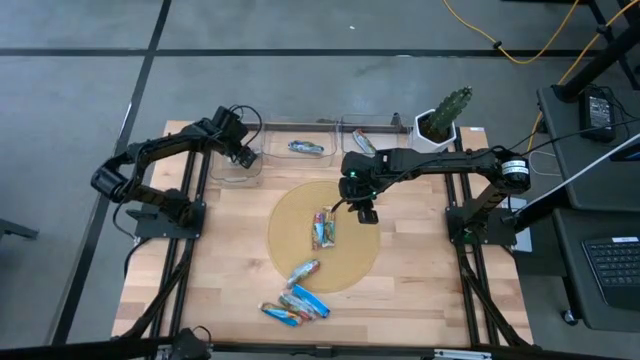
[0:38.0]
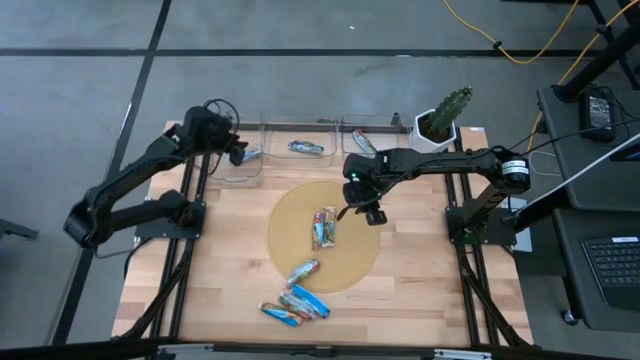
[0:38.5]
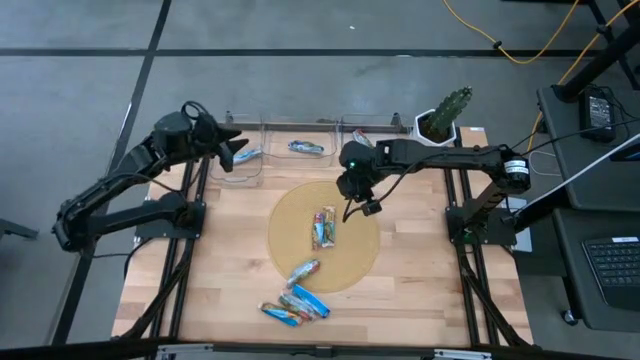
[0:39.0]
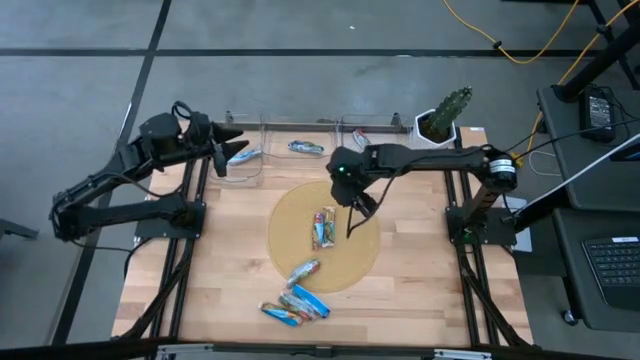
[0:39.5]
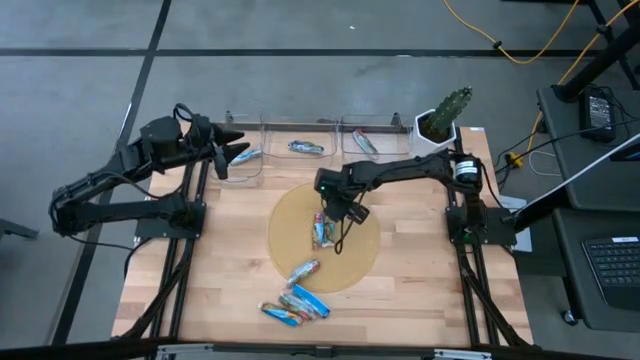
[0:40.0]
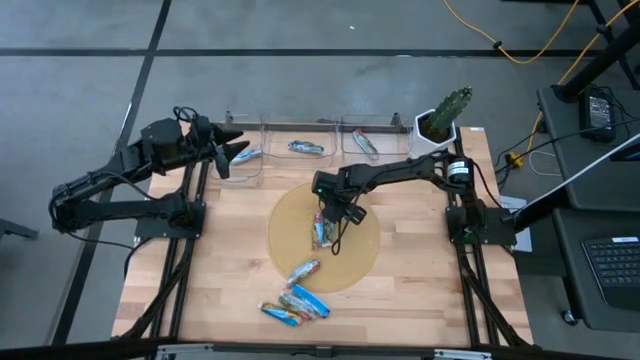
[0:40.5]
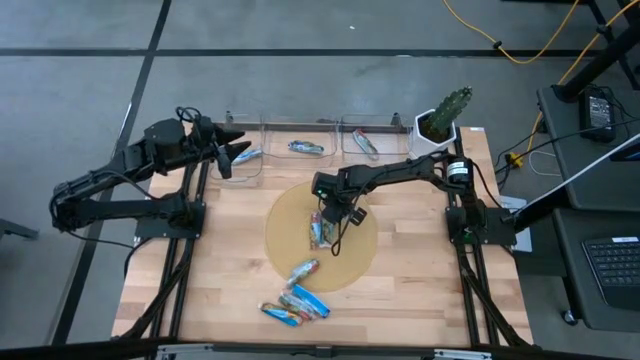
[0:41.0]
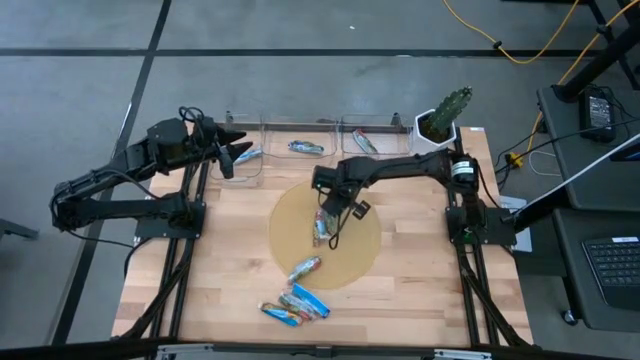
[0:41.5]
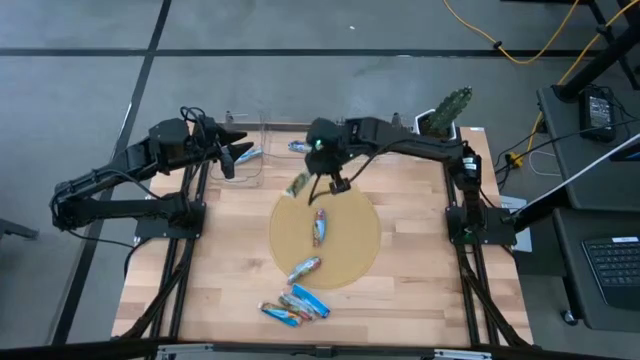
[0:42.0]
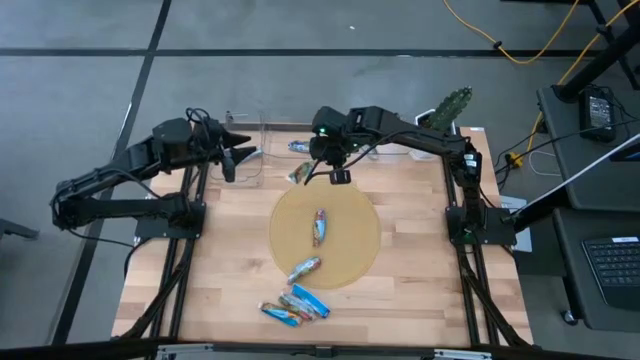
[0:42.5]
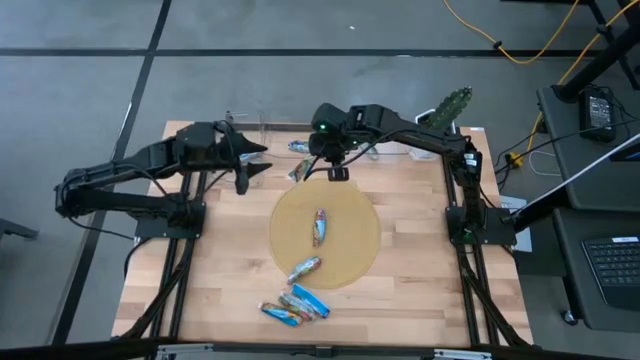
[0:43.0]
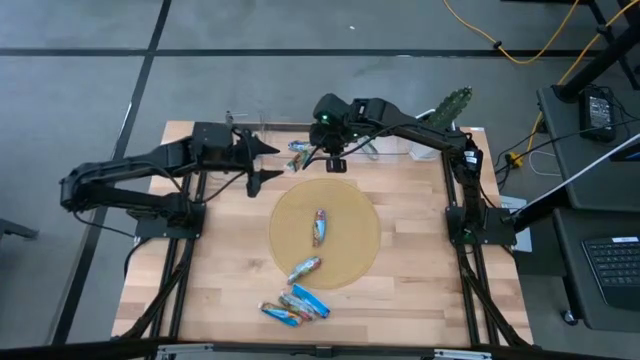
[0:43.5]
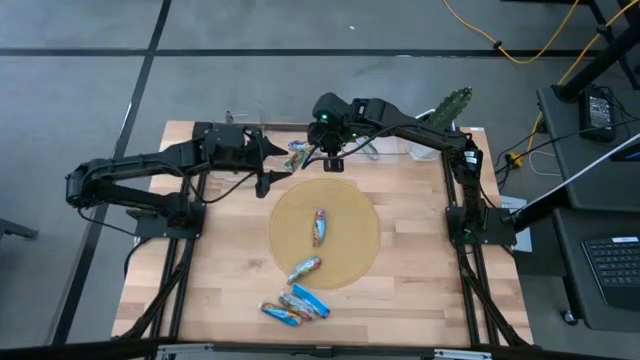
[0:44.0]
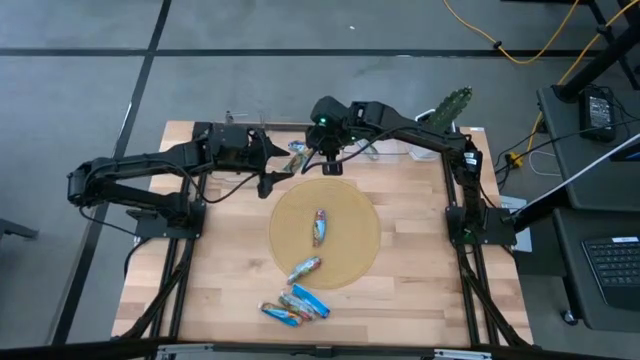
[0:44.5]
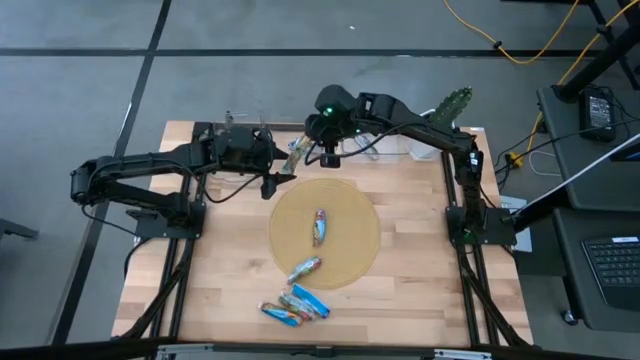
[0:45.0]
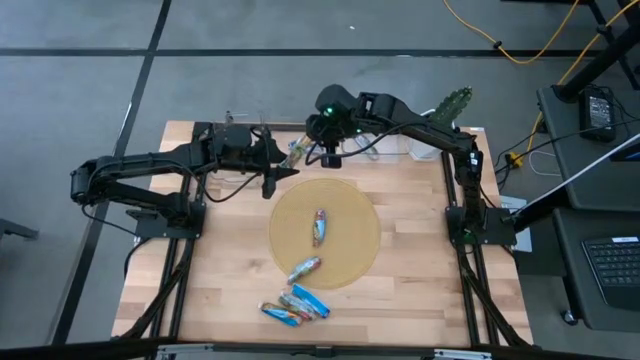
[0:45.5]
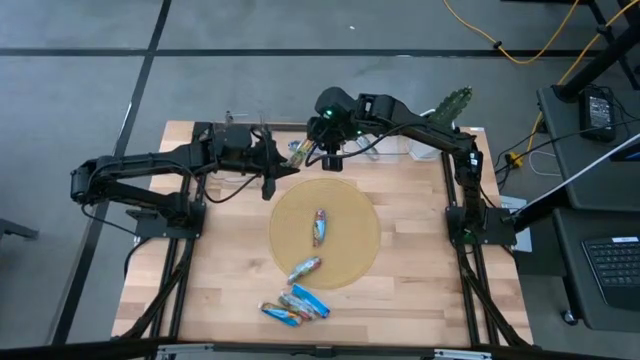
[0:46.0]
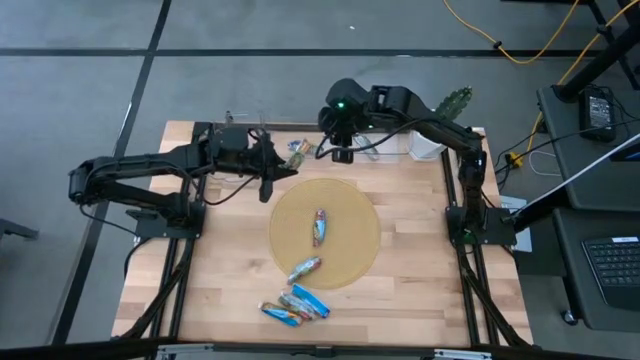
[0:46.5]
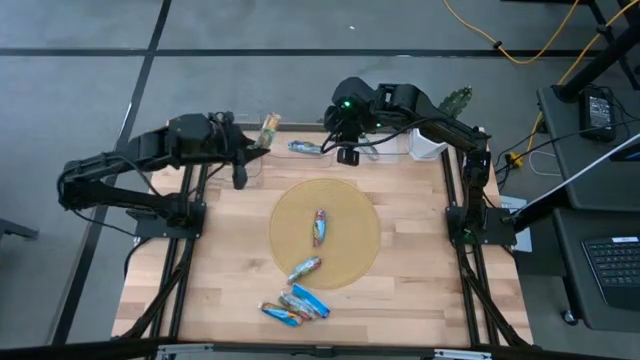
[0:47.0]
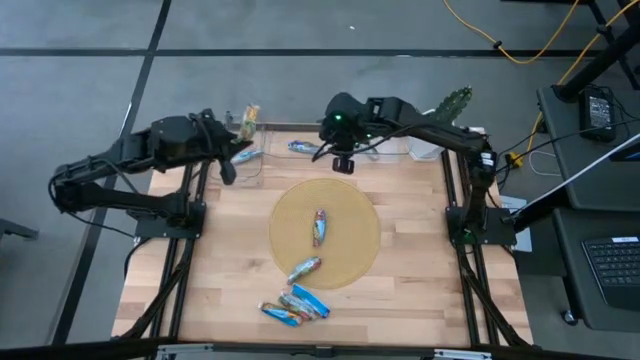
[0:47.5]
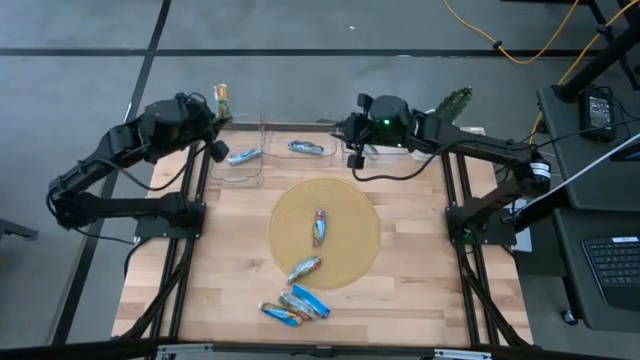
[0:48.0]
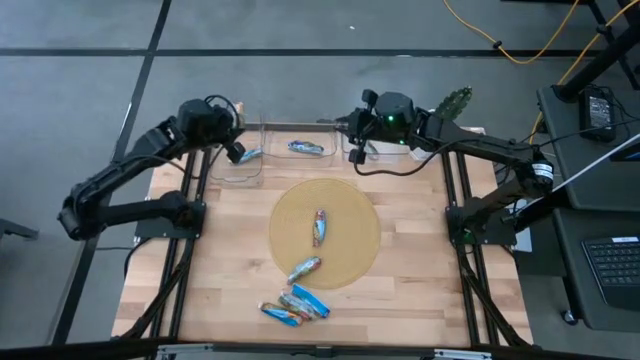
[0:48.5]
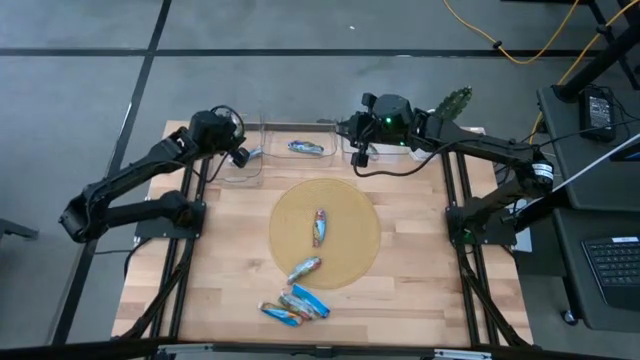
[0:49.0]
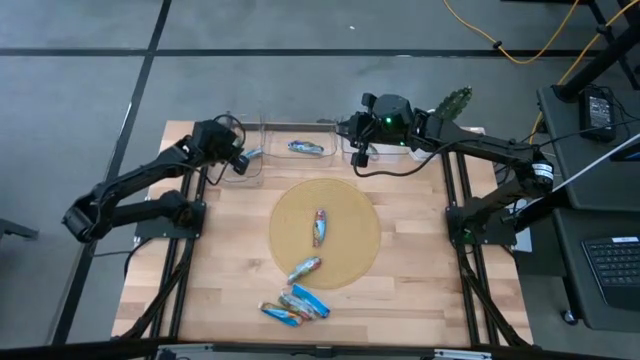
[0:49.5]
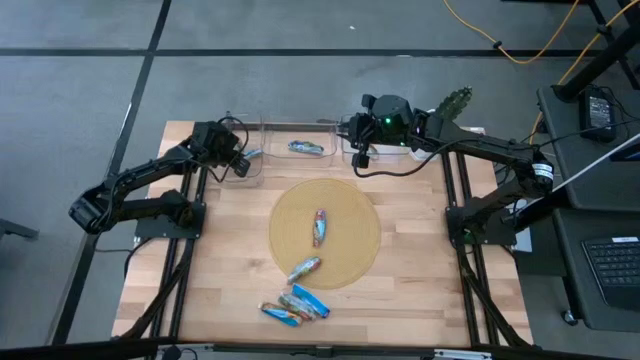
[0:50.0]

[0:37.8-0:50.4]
Task: Pick and place Granola Bars by type
Put the yellow granola bar into the left transparent bin

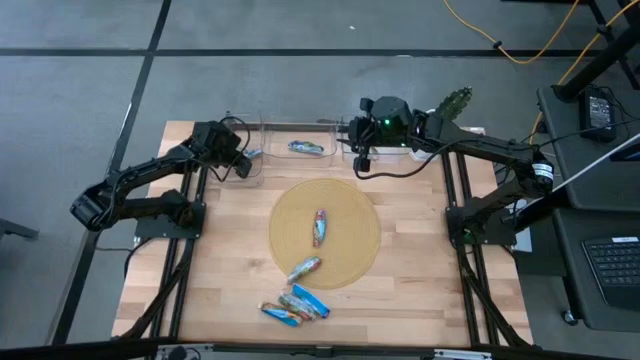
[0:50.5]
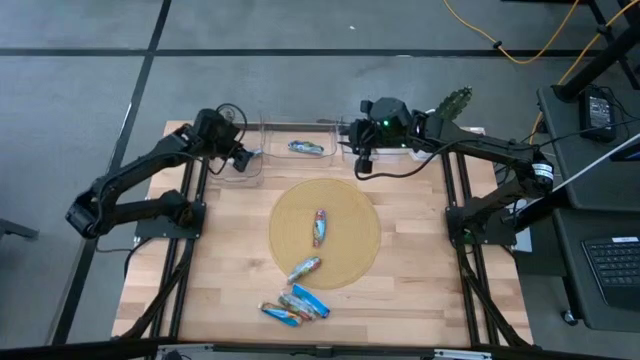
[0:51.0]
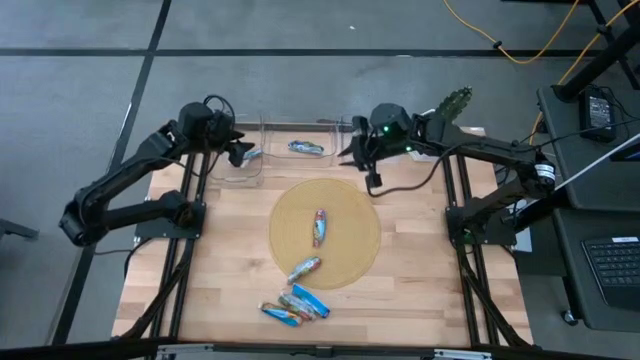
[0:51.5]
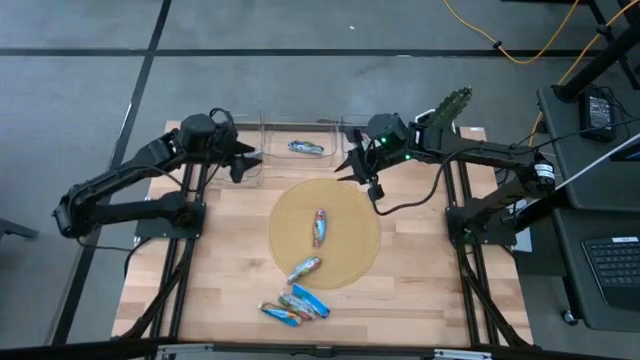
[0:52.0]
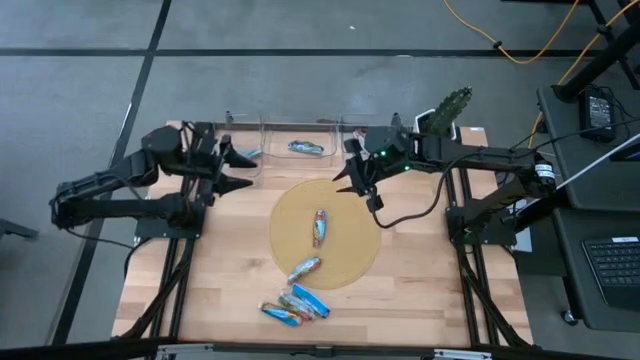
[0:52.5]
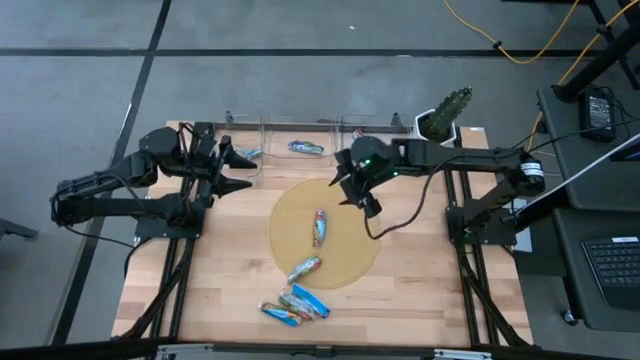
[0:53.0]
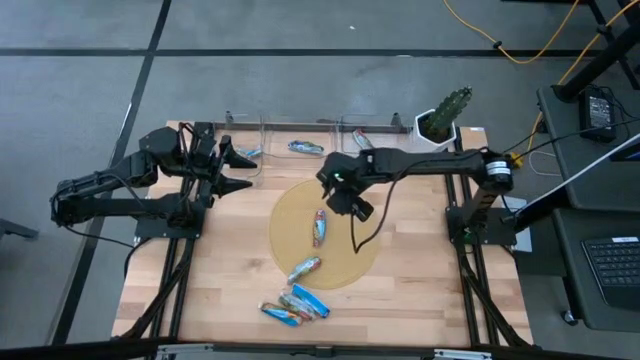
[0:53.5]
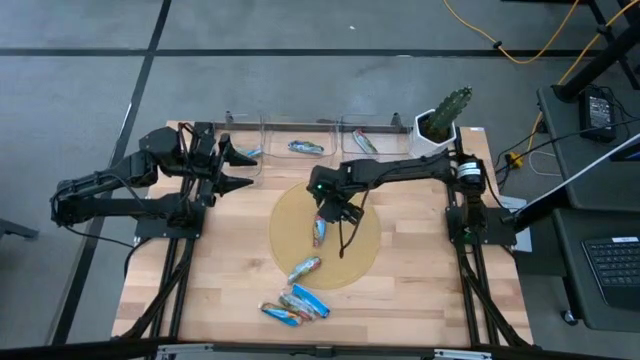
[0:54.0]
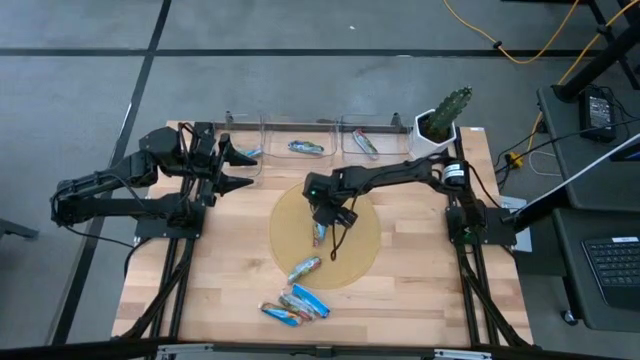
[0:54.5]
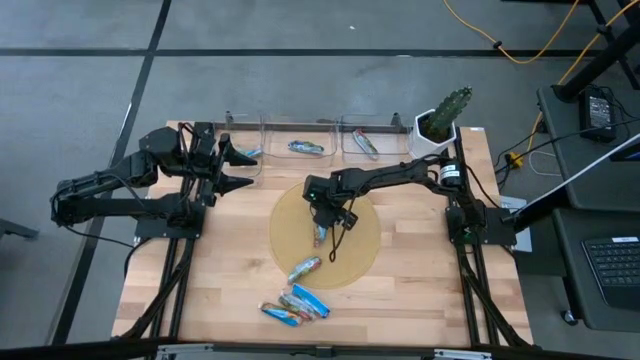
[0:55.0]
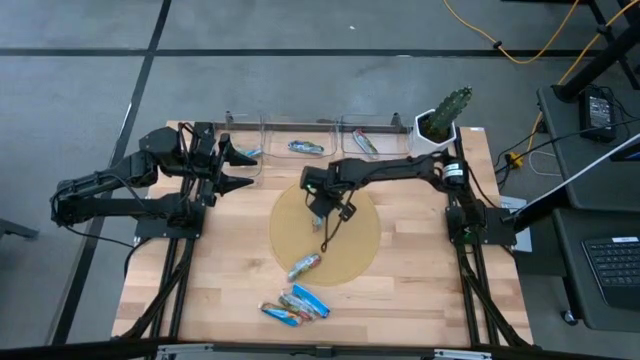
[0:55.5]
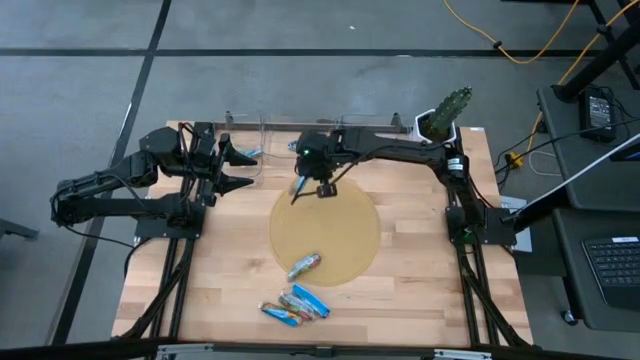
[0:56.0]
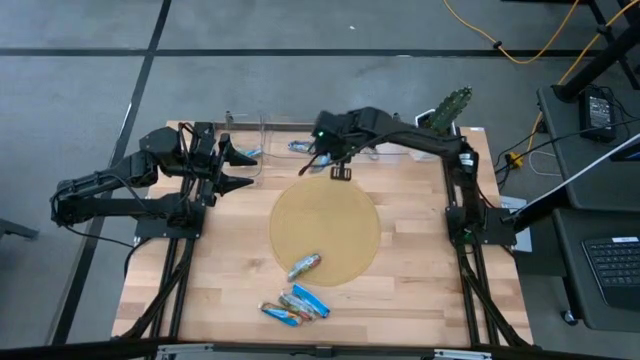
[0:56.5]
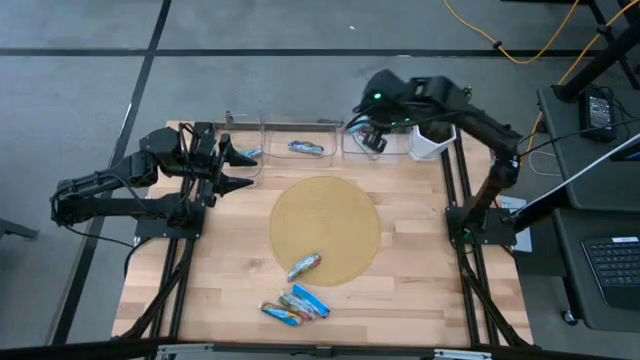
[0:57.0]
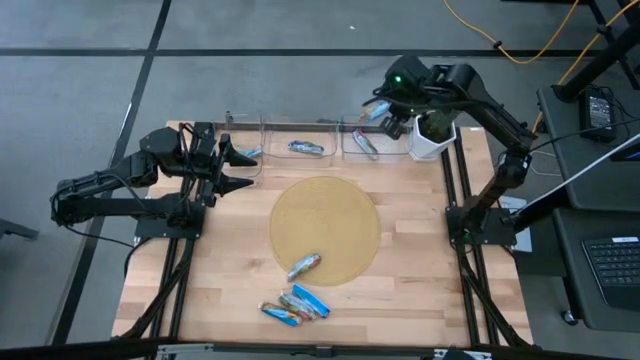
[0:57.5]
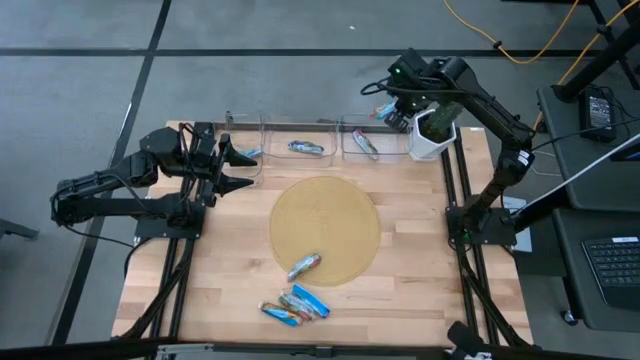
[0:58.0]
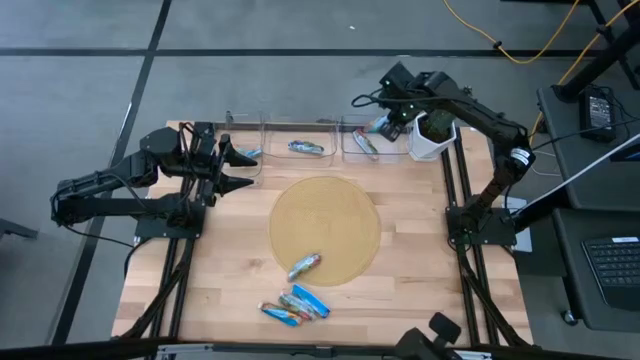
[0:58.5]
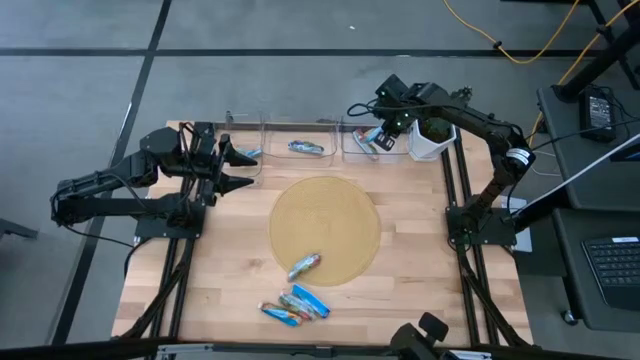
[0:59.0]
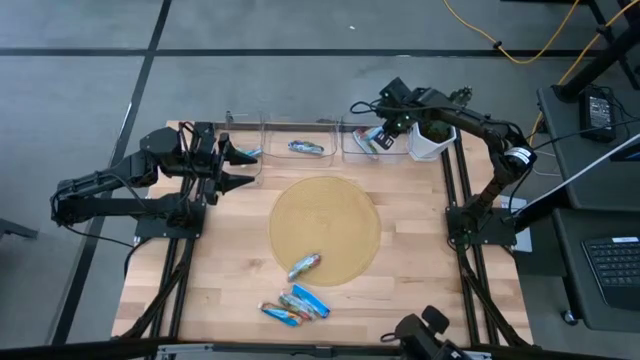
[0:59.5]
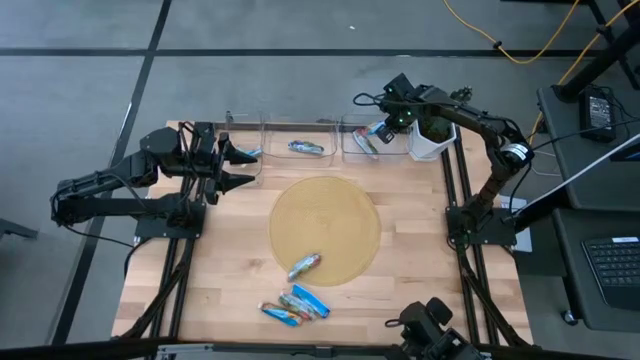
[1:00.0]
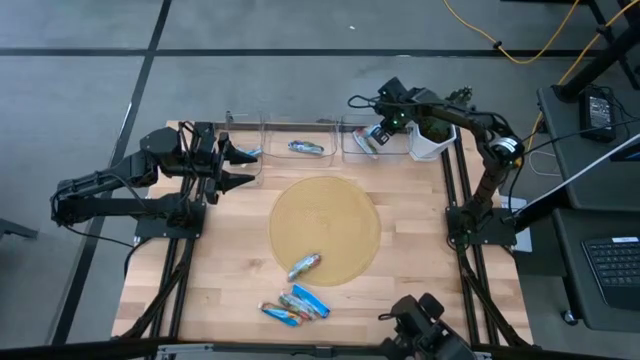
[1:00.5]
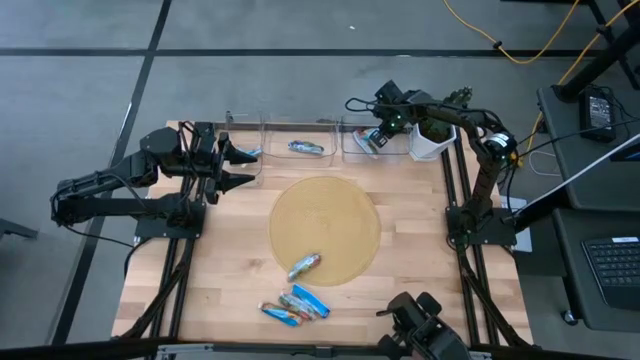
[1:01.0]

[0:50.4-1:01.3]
Put the red granola bar into the right transparent bin
